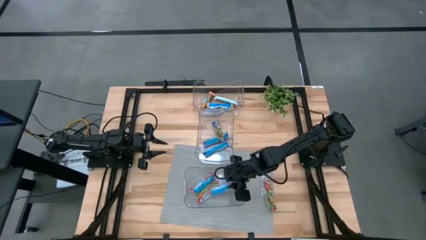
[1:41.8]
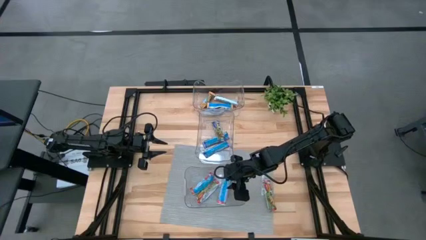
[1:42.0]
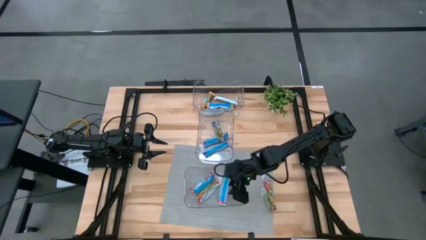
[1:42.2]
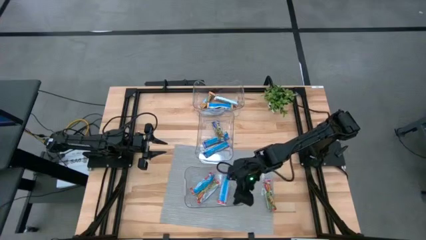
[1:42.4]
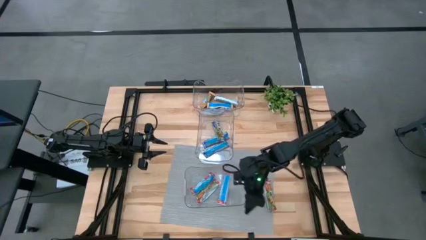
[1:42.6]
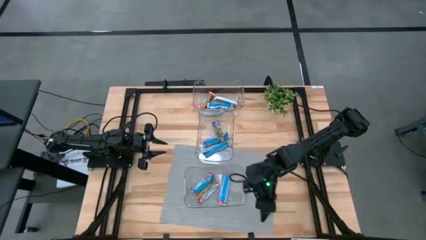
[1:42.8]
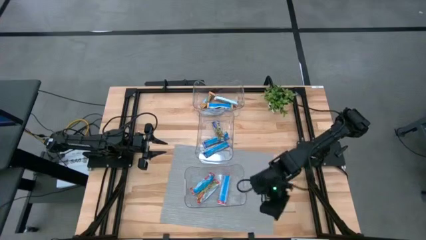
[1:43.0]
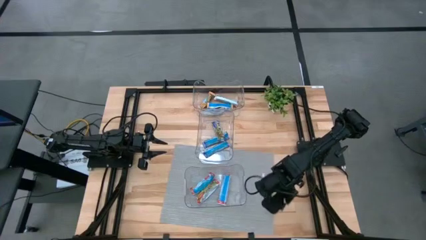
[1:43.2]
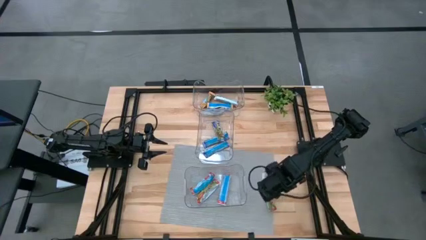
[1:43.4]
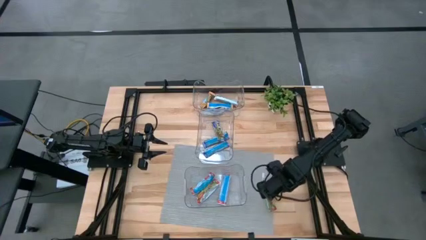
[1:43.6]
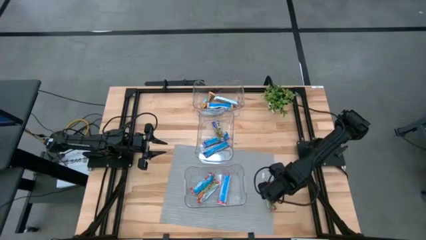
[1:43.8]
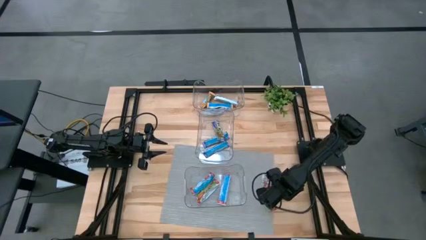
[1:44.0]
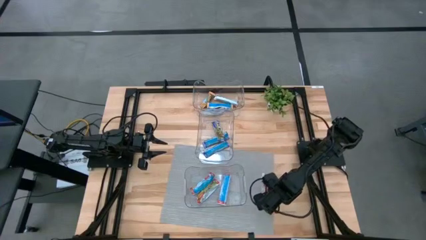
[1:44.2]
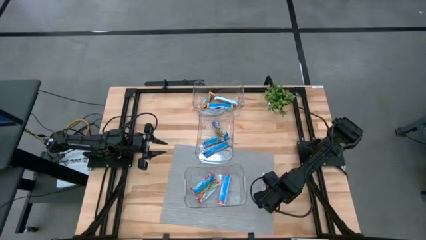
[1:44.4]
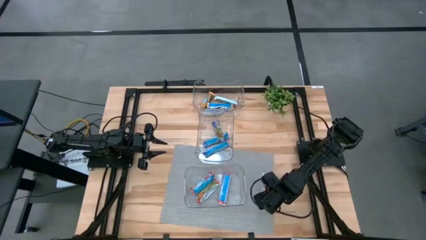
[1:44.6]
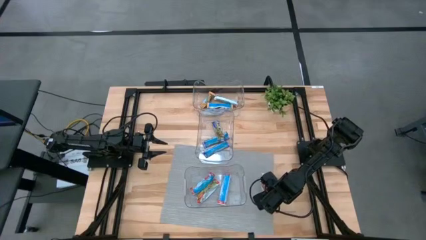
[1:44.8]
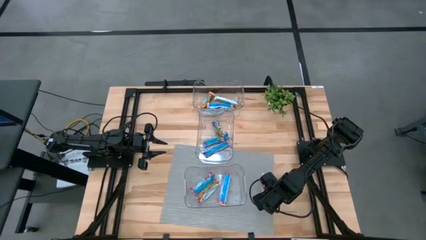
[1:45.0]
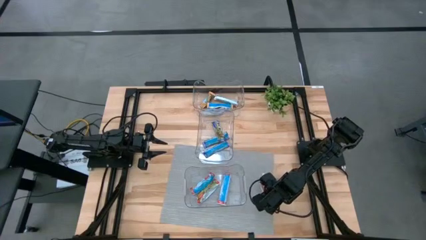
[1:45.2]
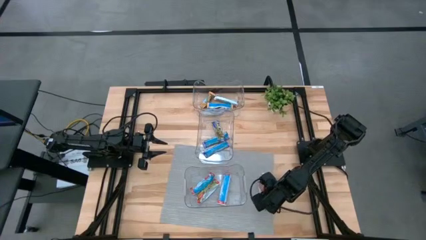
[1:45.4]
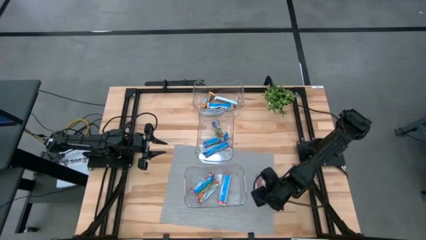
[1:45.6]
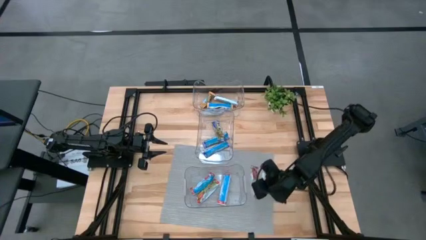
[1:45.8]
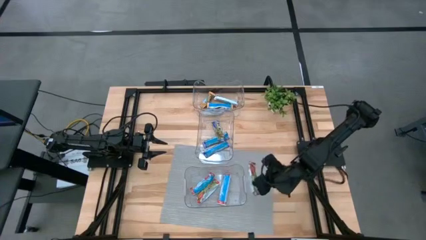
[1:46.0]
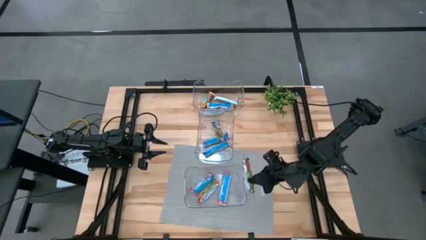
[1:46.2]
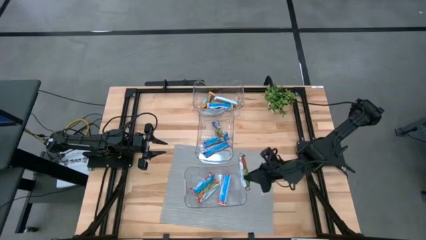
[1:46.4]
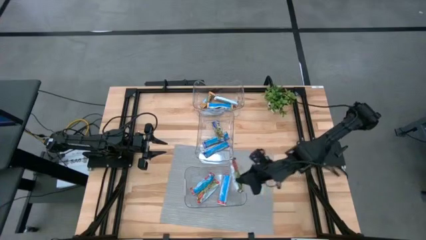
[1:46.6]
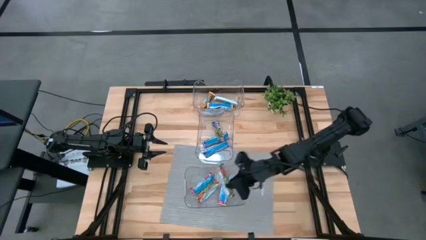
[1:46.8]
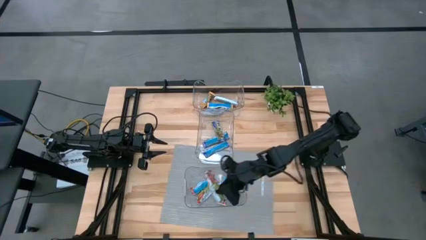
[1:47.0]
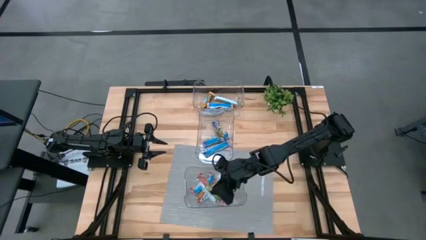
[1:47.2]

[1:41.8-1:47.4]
Task: Pick and place Granola Bars by type
Put the red granola bar into the bottom transparent bin

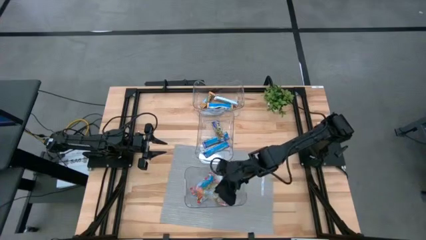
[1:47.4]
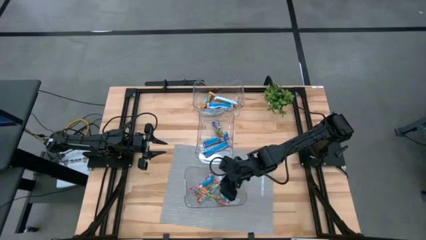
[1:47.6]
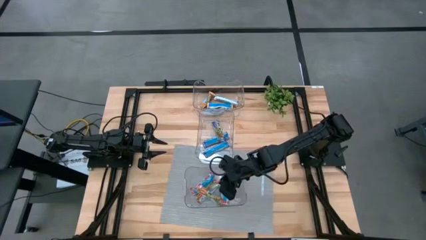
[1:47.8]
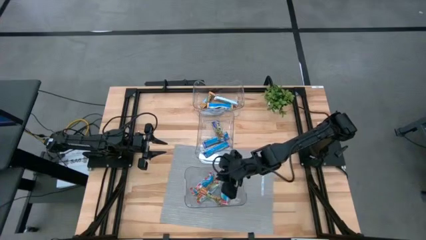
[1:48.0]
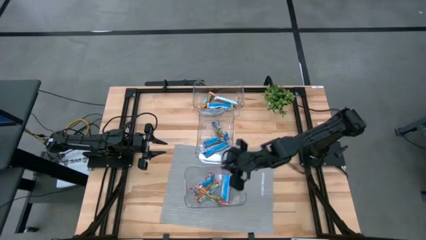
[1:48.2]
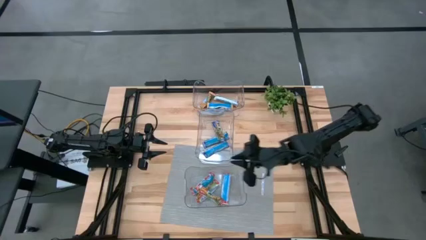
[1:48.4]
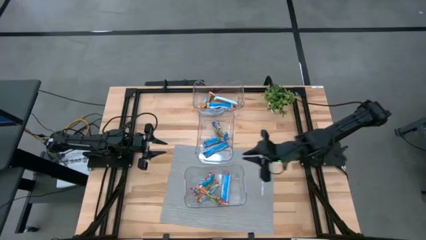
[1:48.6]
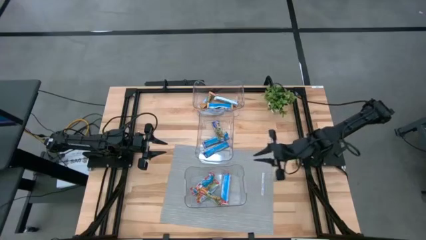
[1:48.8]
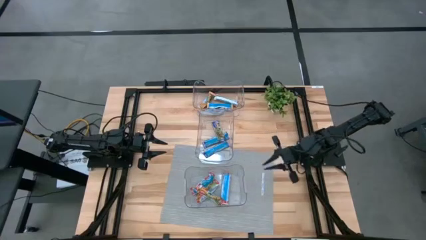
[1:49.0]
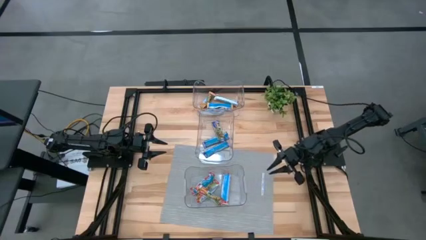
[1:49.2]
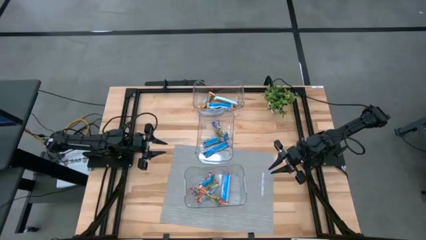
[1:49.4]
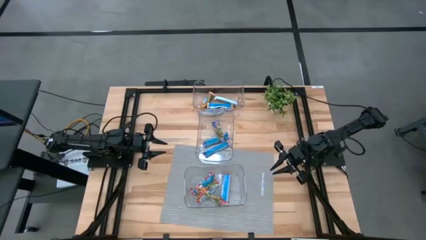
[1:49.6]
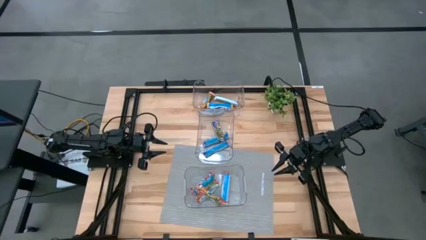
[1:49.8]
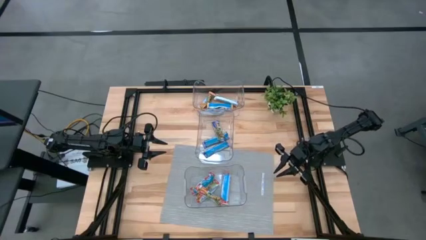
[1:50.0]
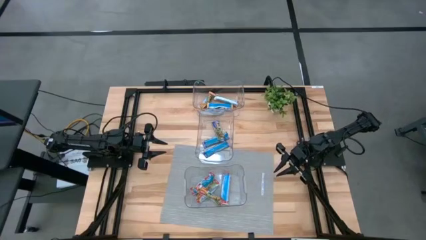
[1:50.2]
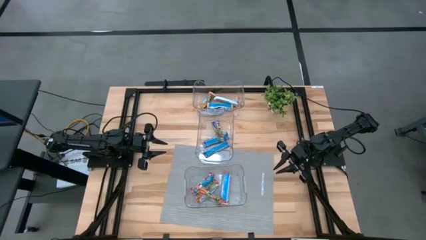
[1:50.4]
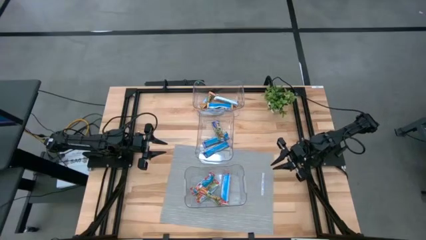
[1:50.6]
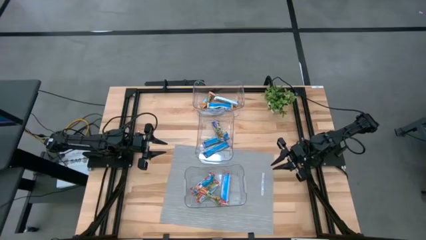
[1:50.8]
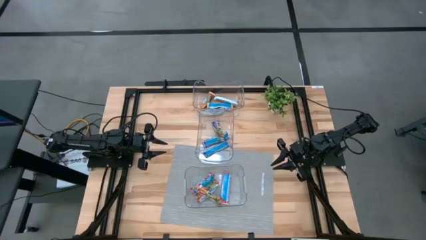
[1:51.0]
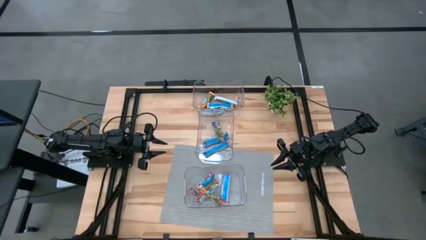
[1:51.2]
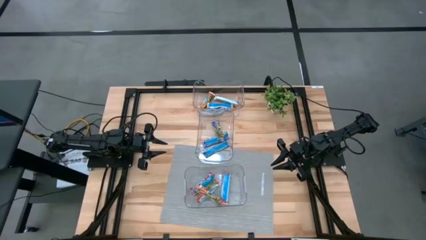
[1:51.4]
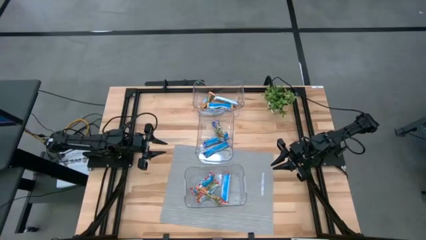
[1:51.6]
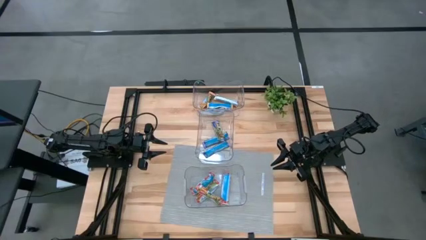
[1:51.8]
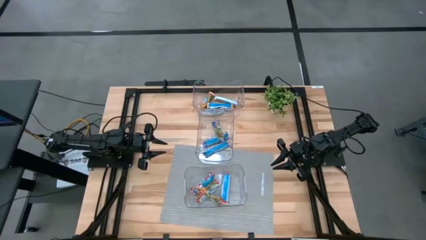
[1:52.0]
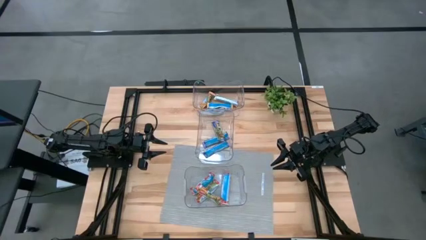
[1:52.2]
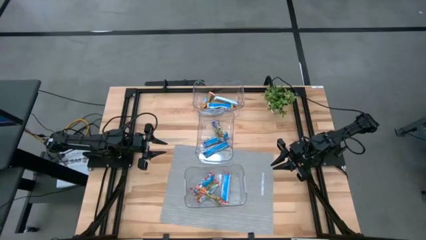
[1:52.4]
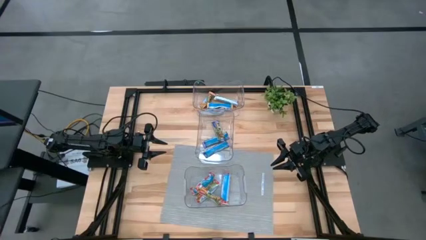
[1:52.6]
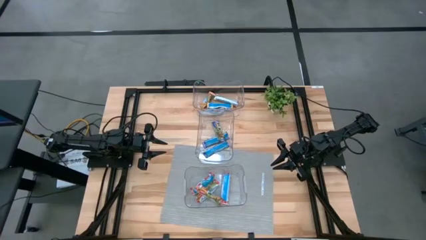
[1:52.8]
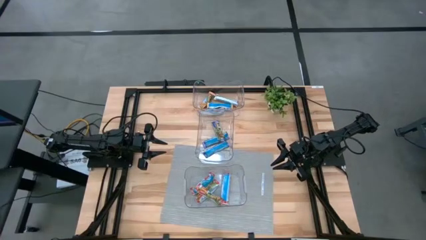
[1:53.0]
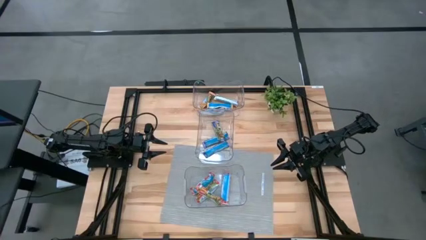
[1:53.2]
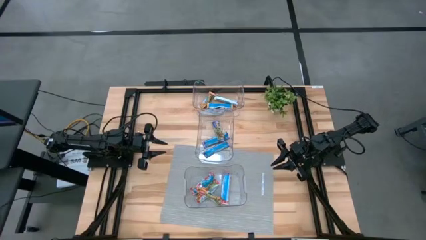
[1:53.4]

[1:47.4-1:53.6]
Return to Home Position

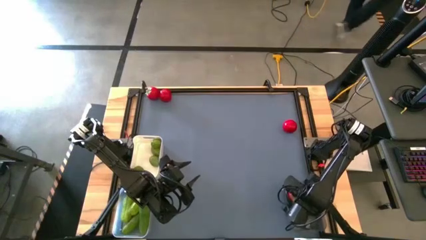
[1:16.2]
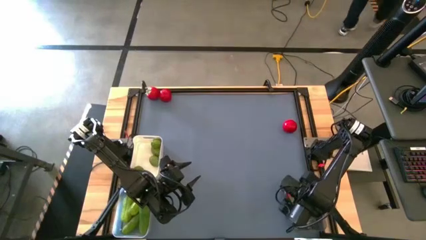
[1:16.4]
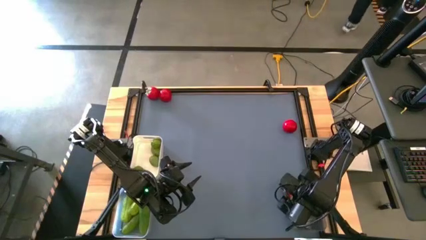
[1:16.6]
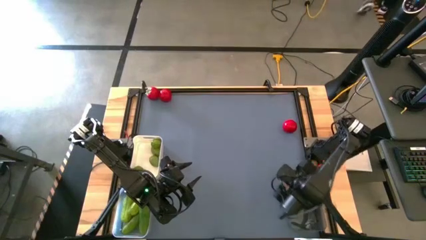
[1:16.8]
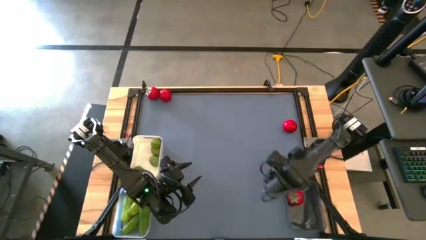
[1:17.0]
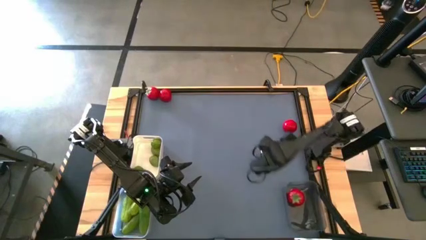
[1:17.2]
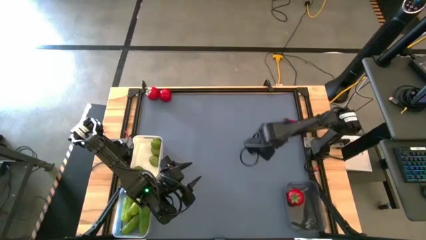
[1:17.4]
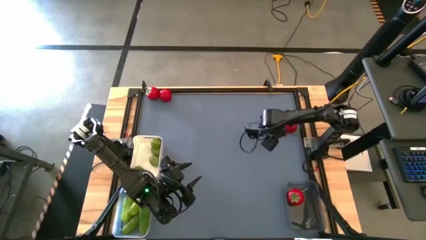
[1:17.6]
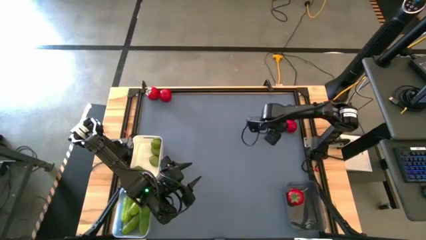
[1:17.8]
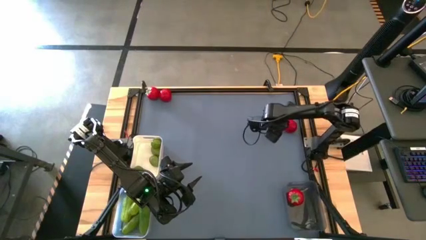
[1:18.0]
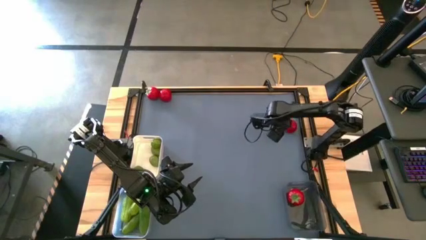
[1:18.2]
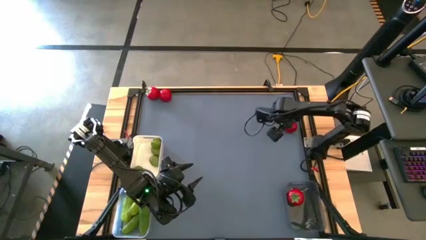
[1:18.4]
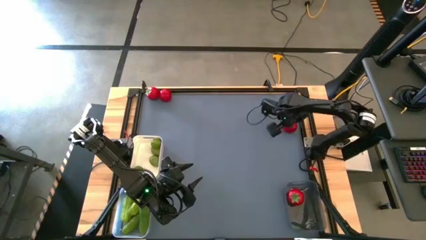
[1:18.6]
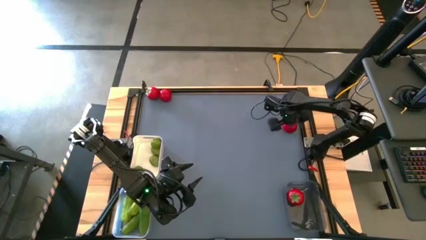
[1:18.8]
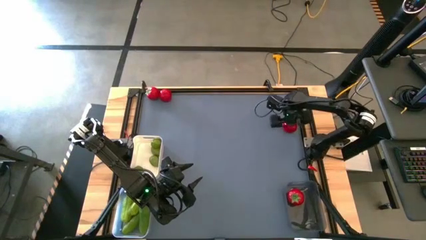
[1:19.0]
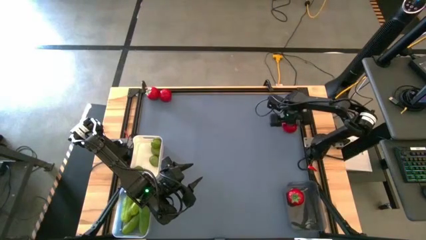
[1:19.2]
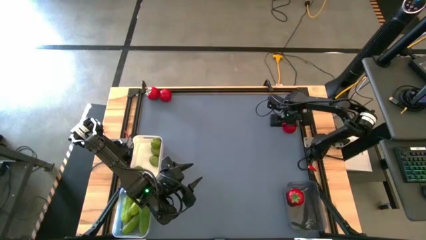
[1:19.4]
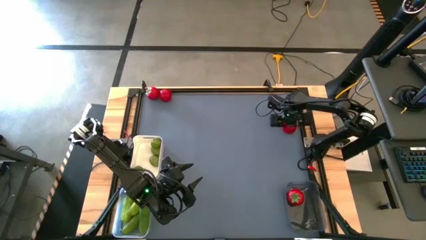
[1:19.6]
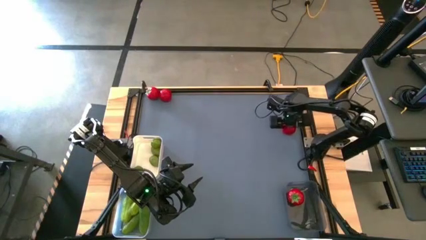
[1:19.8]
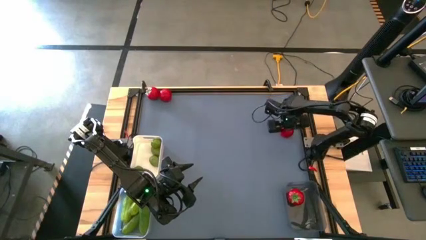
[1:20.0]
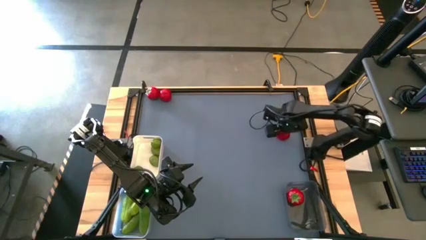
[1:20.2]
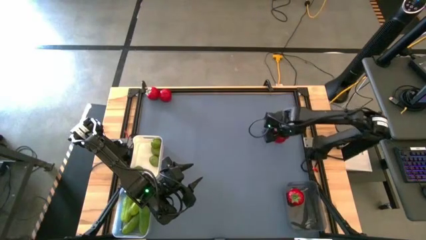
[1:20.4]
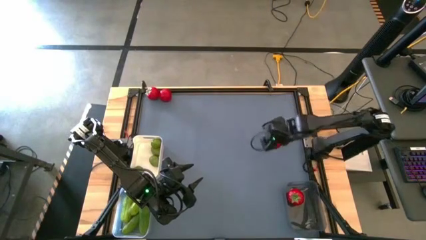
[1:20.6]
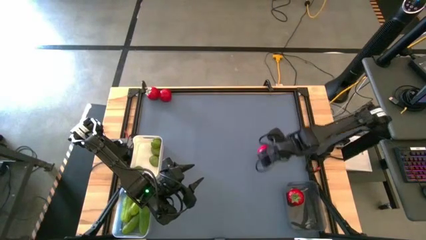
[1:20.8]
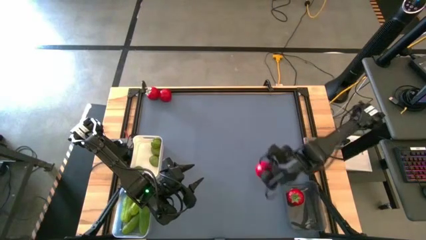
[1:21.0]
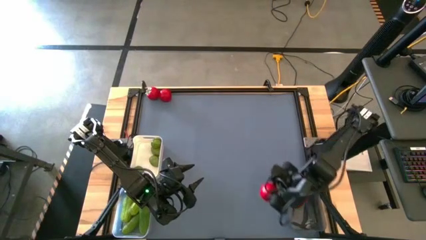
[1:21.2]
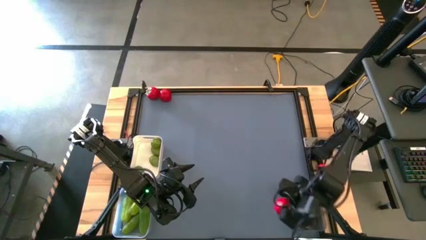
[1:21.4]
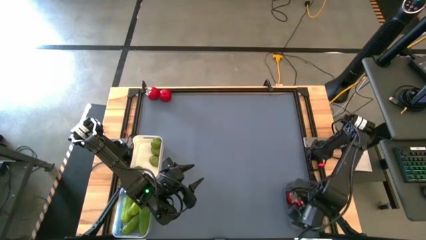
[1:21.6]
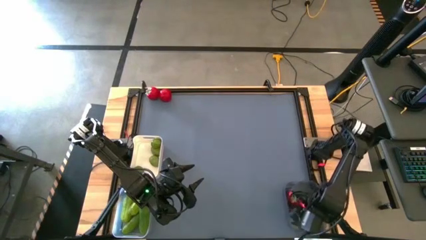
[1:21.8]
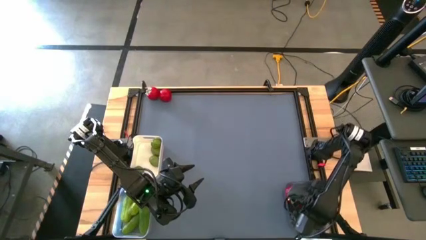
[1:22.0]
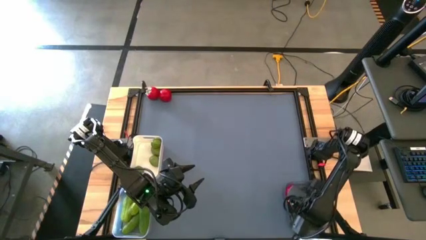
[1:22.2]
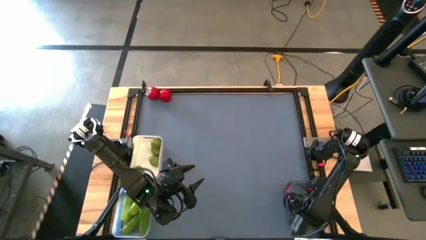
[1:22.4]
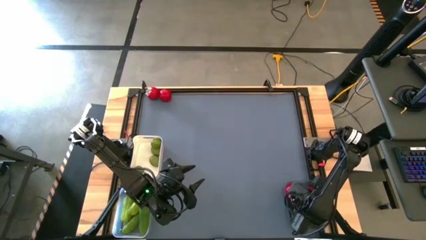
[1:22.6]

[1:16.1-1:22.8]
Task: Sort produce into baskets
Put the red tomato into the black bin
